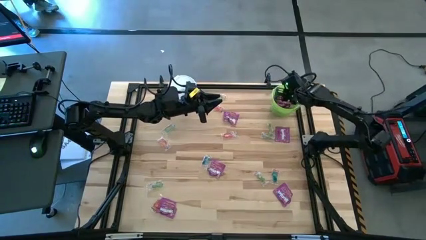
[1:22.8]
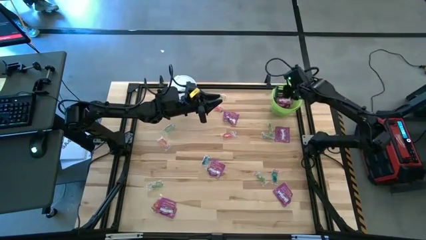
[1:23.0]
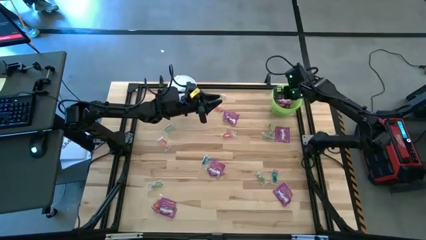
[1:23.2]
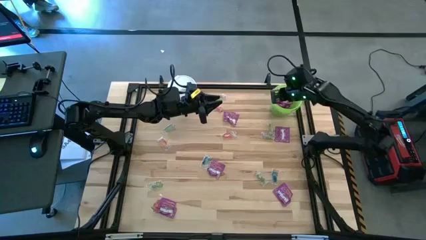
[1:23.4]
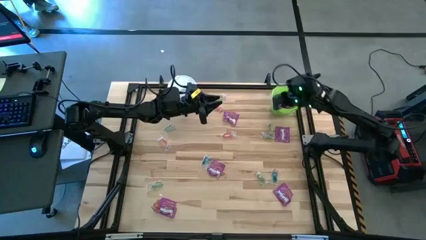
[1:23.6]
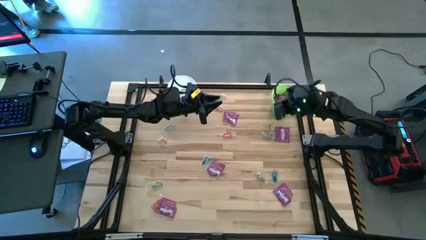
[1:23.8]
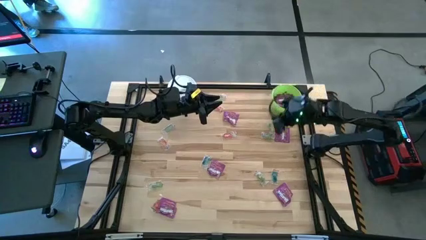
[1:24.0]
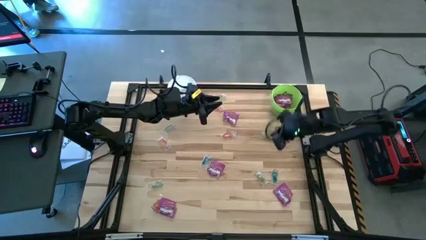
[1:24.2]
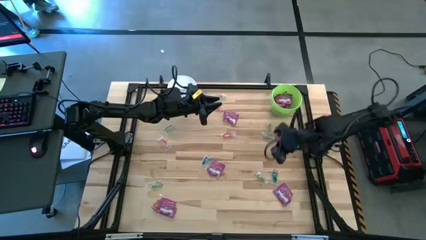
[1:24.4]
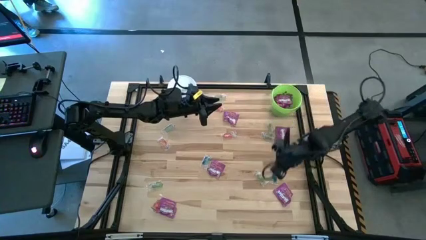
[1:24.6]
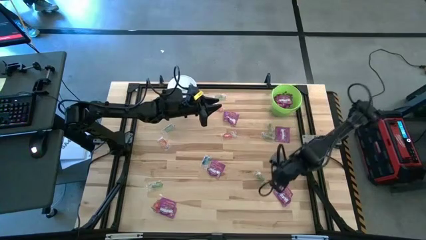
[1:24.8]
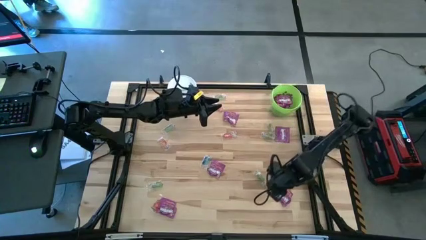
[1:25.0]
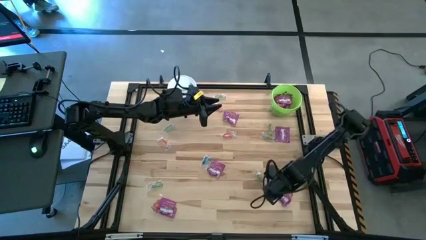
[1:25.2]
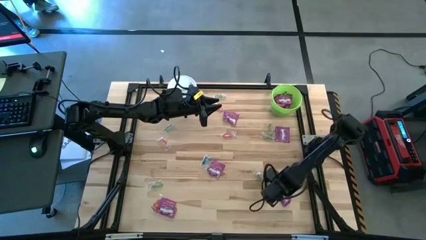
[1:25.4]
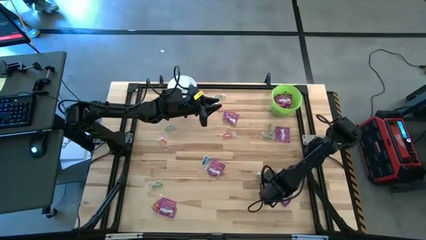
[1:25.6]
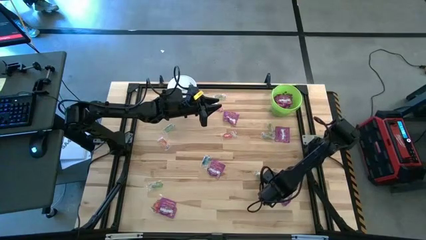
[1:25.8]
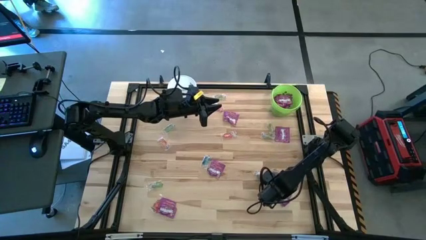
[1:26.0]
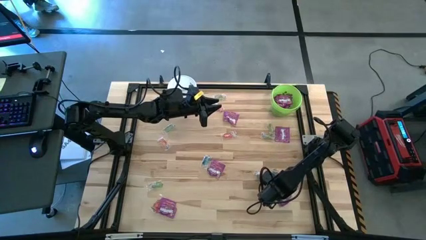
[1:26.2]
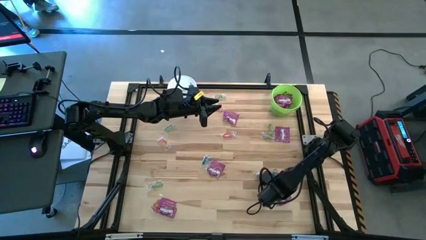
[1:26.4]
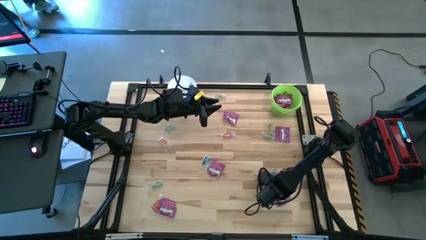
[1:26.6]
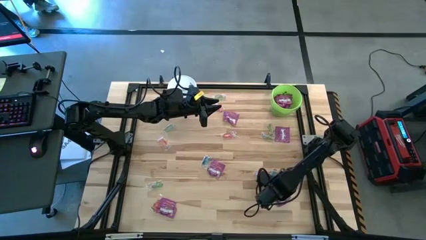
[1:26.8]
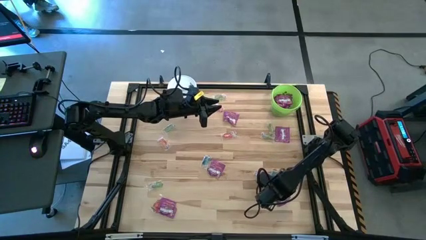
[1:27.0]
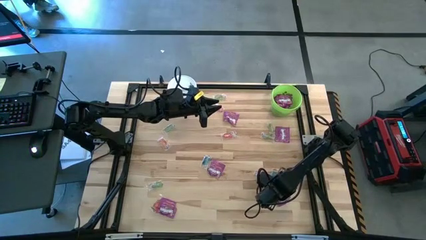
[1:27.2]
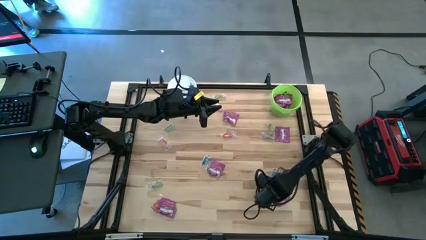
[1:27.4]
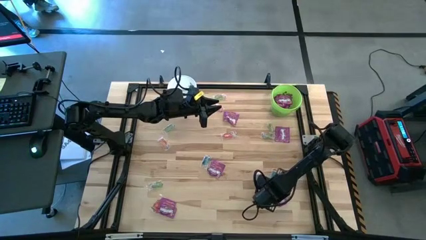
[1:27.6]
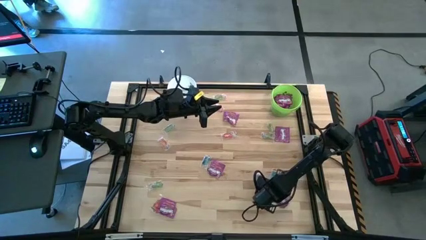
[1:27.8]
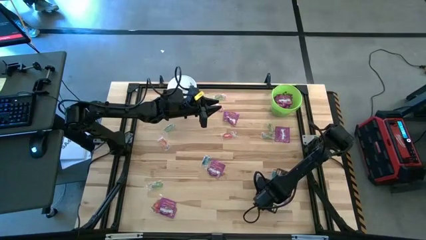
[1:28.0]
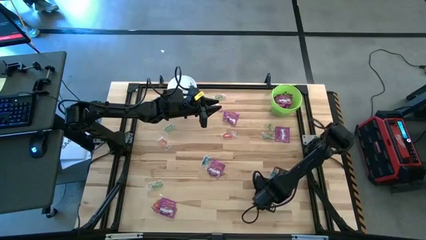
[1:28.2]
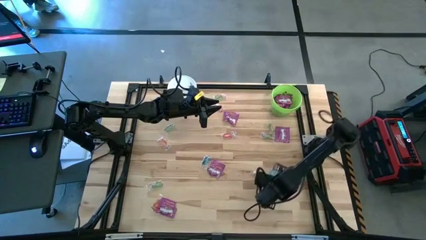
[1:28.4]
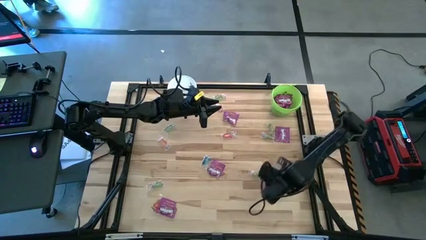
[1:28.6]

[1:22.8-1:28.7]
Task: Sort candy by brand, put in halloween buckets
Put the violet candy into the green bucket

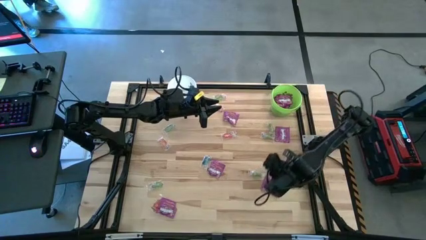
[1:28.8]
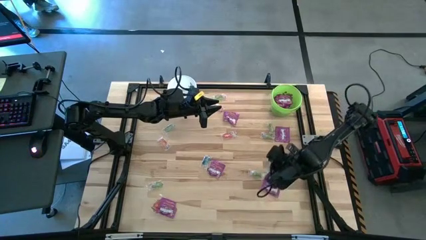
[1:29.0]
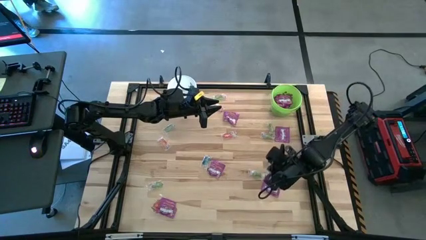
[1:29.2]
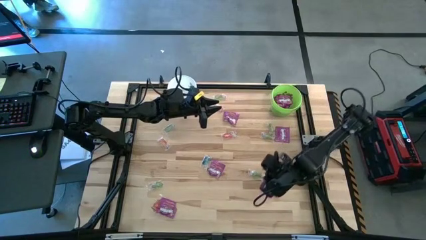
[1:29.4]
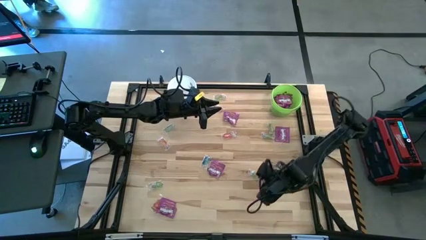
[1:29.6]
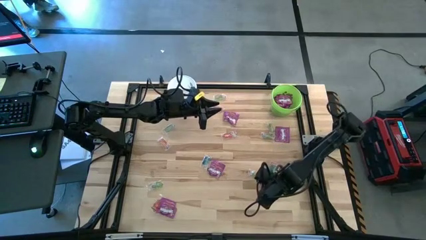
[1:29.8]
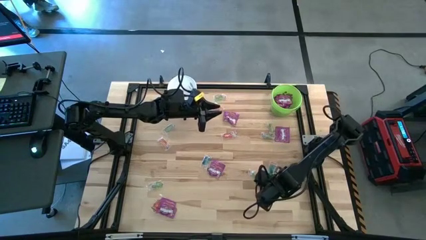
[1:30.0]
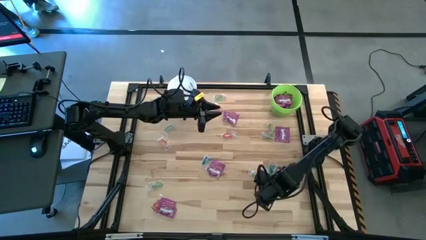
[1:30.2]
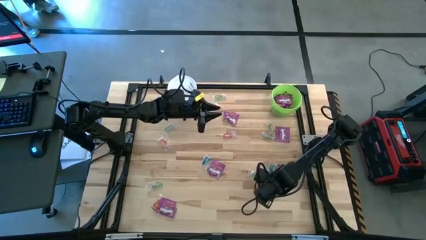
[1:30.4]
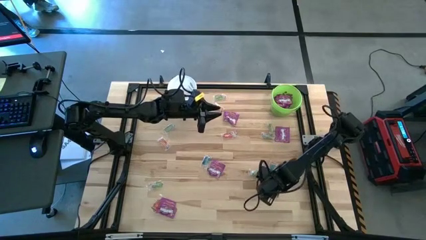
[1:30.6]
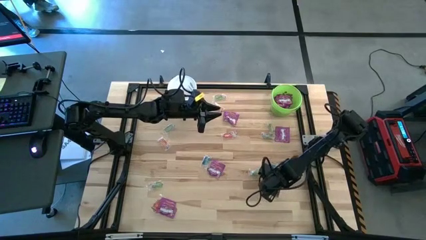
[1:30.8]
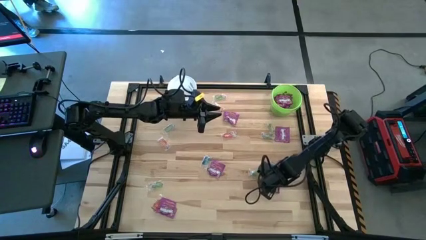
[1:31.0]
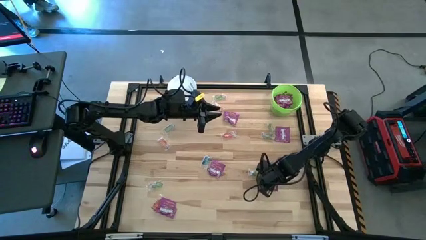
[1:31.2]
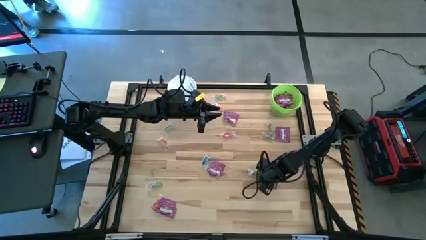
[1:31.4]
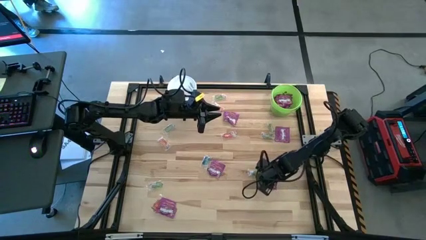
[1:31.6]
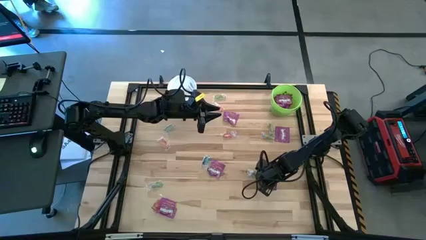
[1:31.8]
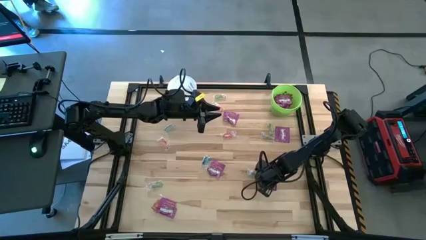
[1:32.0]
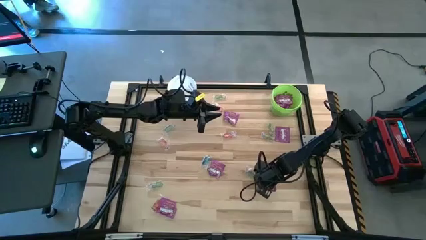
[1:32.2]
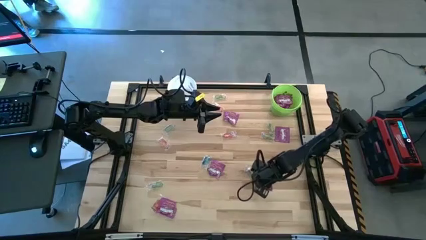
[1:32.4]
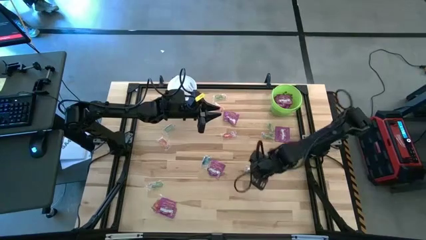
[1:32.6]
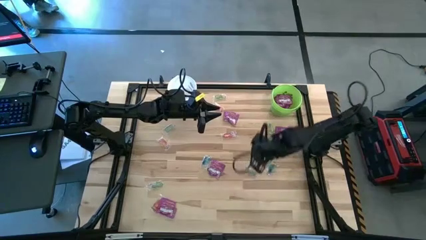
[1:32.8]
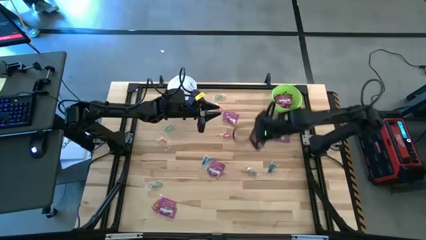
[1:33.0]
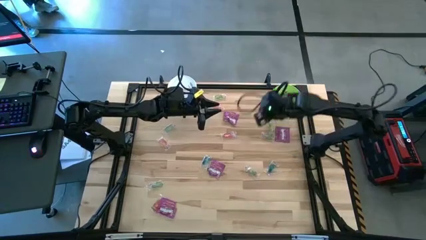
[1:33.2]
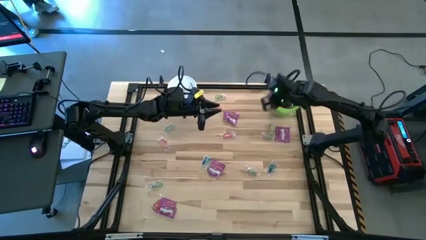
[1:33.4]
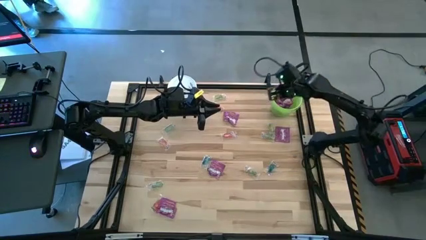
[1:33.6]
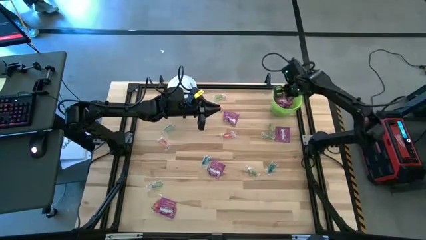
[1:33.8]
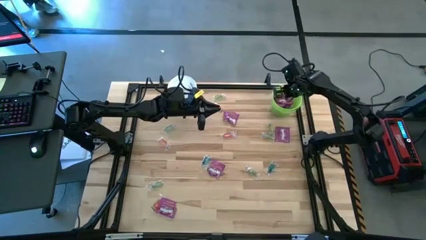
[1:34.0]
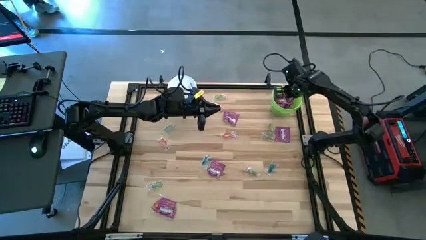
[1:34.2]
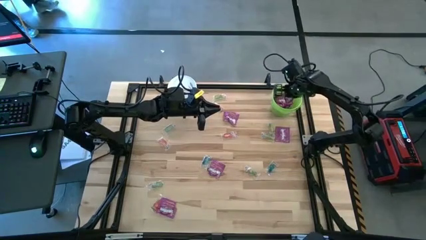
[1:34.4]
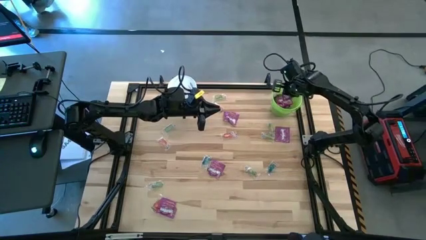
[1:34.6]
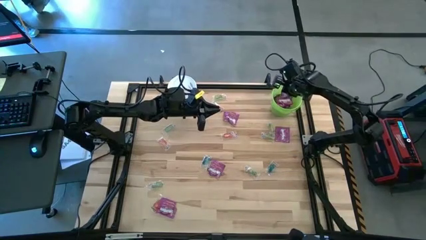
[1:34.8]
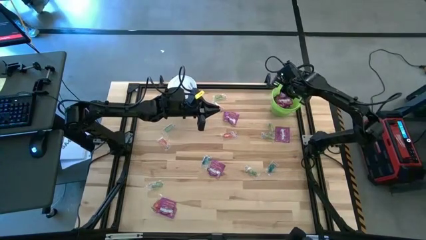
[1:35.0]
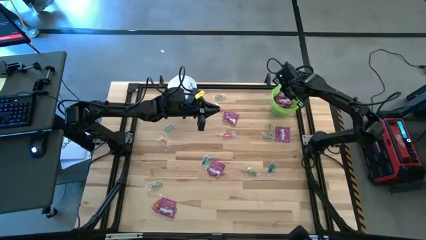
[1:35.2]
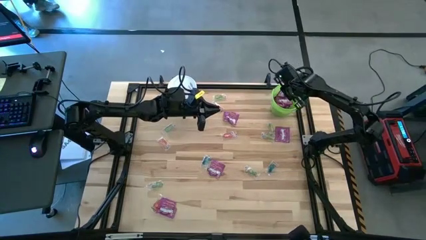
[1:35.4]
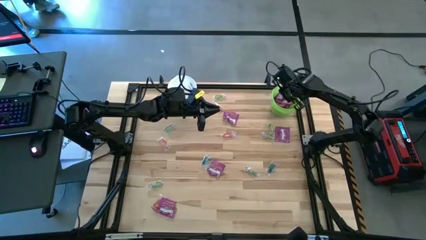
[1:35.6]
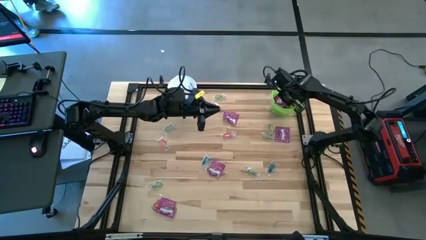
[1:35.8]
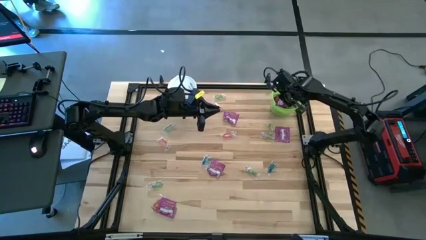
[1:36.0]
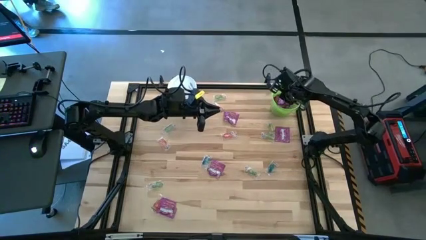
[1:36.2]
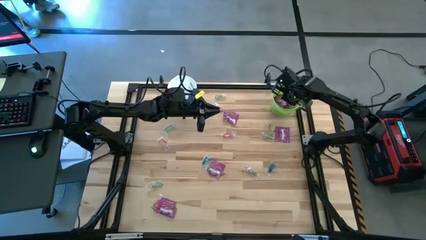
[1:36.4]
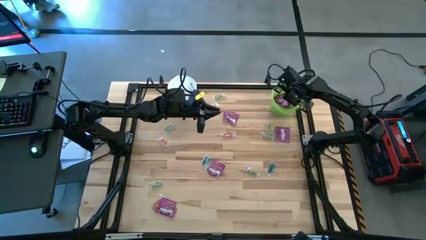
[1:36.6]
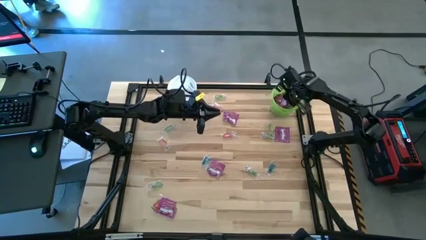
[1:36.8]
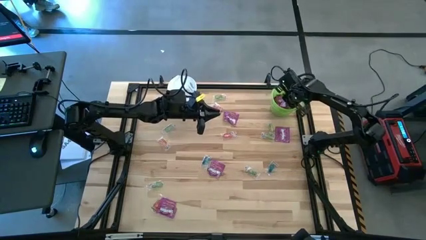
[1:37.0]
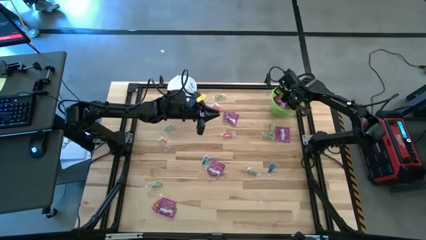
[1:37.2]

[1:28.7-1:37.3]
Put the violet candy into the green bucket

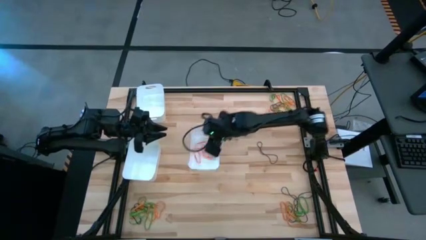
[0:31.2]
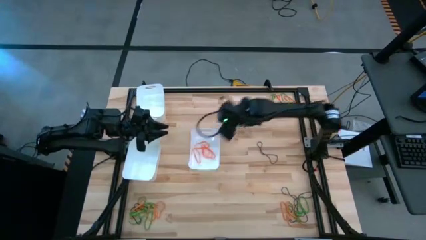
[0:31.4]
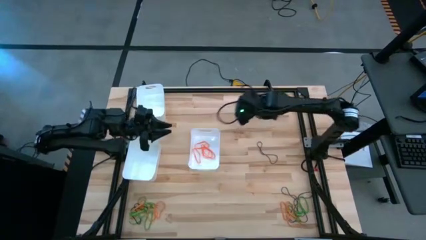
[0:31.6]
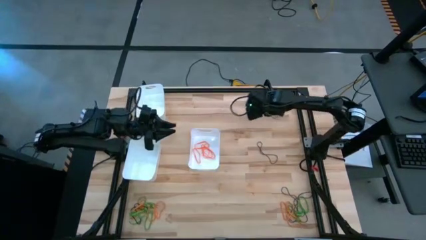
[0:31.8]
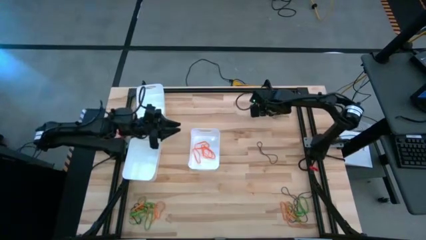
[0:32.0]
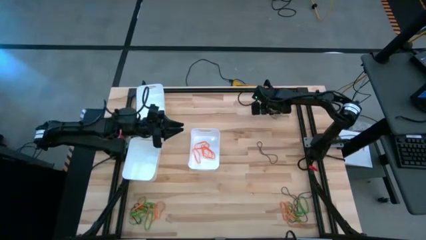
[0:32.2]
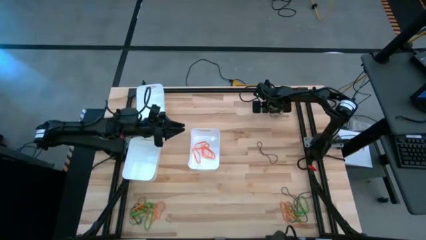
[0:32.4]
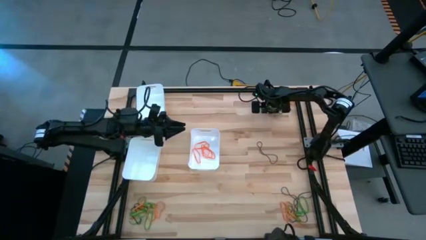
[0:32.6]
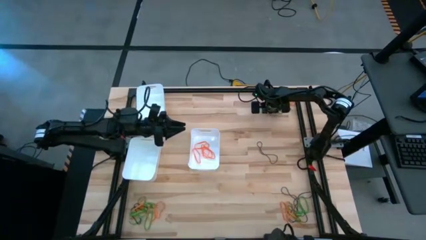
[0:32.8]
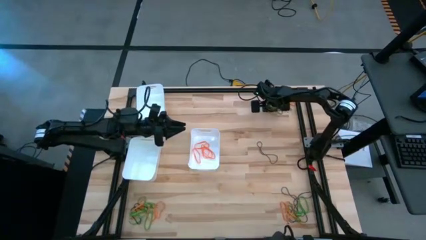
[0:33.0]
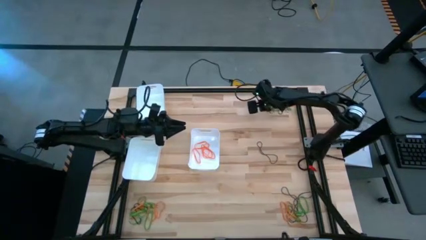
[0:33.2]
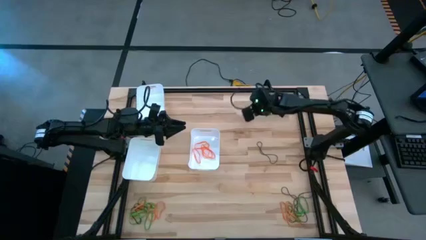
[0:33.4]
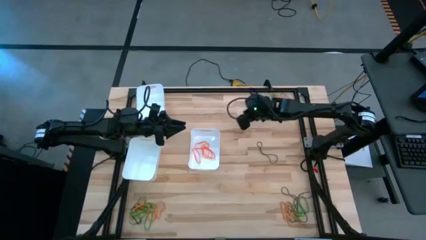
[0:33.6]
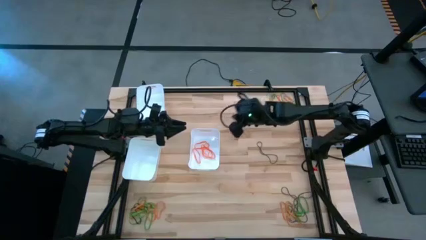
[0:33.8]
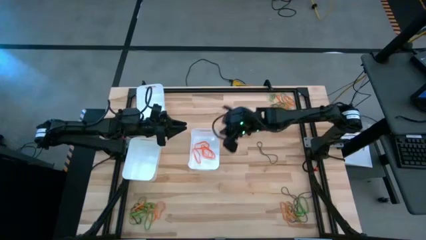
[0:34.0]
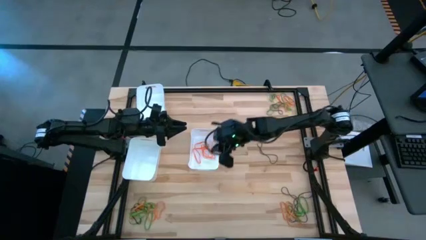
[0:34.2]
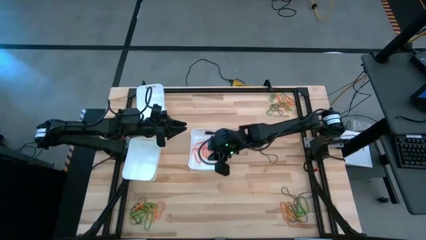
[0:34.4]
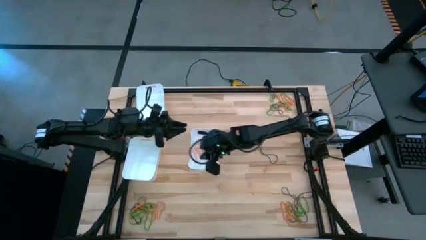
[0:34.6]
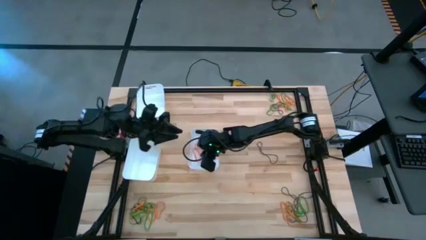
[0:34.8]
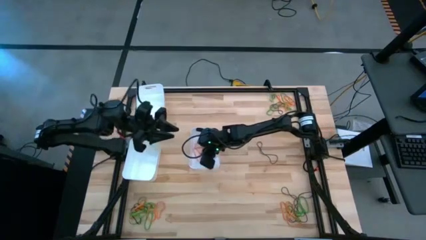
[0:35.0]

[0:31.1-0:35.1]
Task: Sort rubber bands into baskets
Put the orange rubber band into the bottom right white bin
